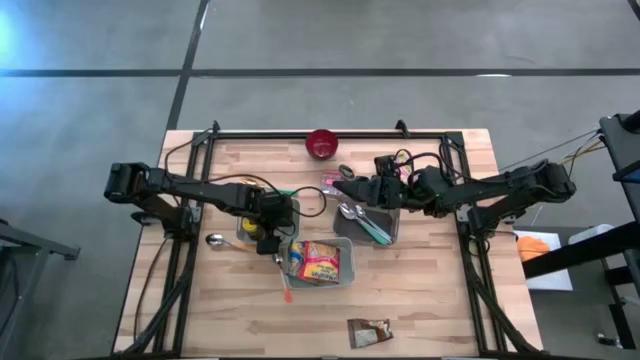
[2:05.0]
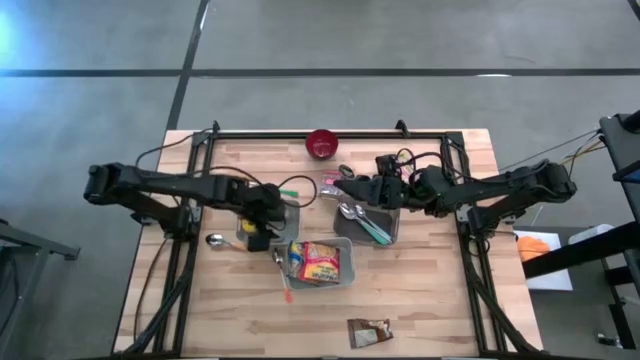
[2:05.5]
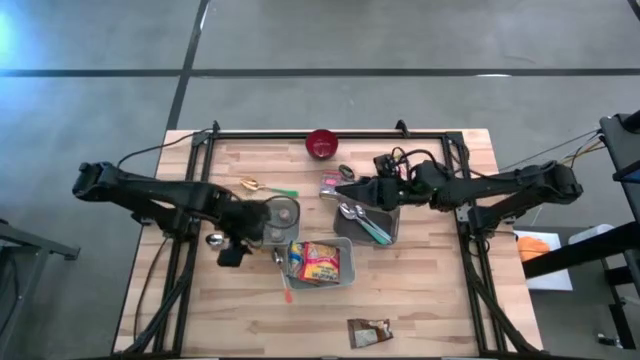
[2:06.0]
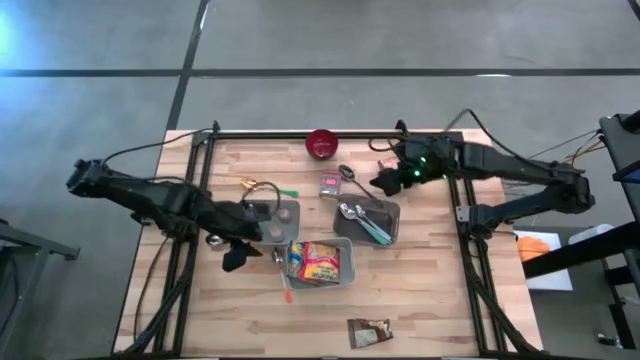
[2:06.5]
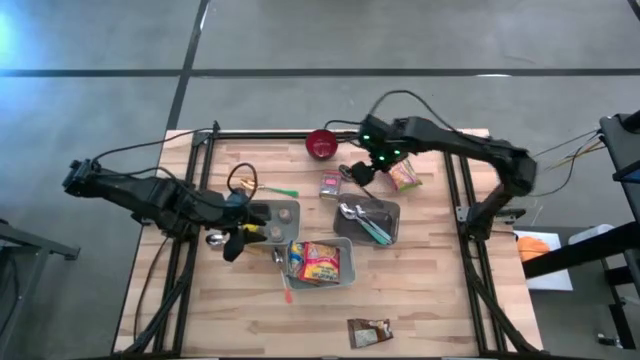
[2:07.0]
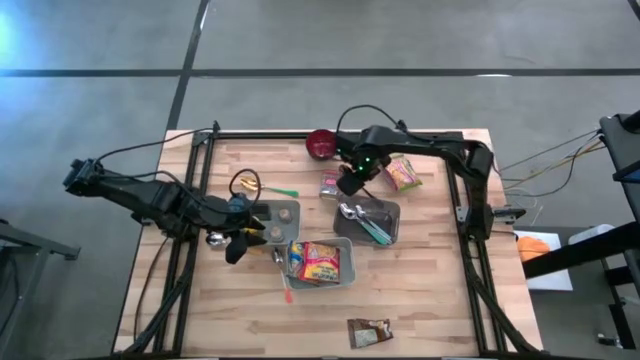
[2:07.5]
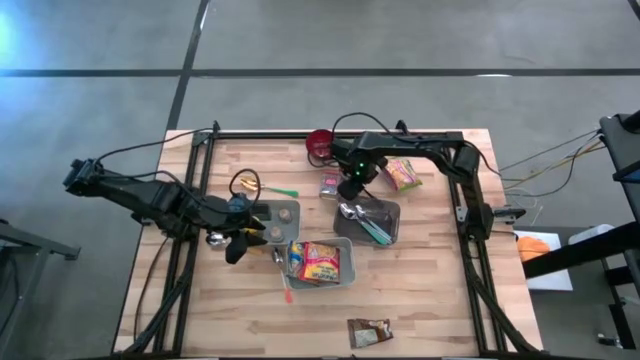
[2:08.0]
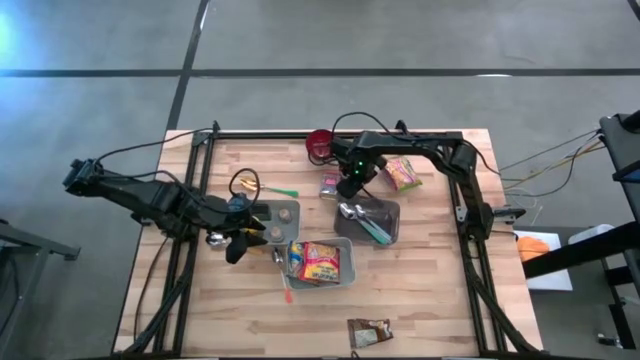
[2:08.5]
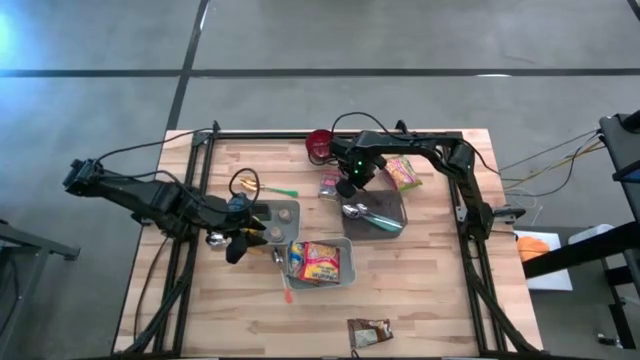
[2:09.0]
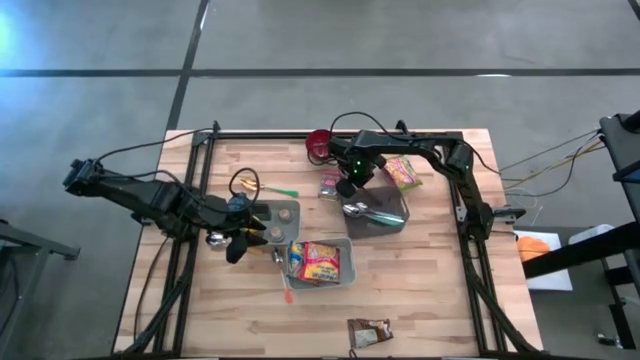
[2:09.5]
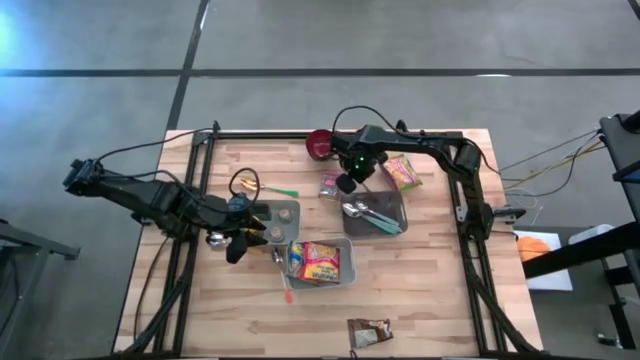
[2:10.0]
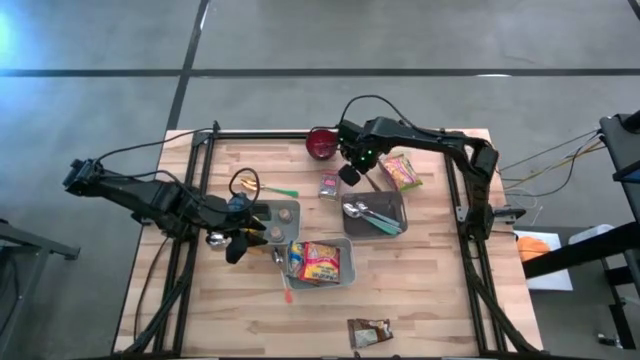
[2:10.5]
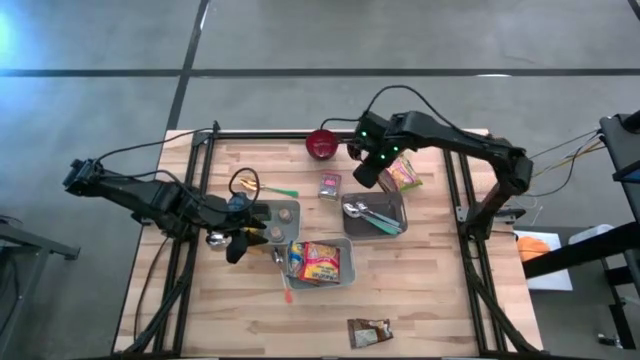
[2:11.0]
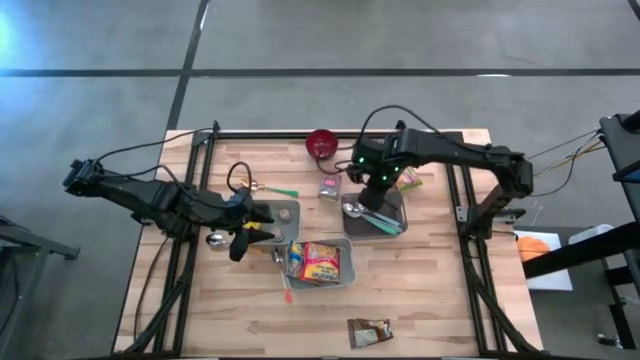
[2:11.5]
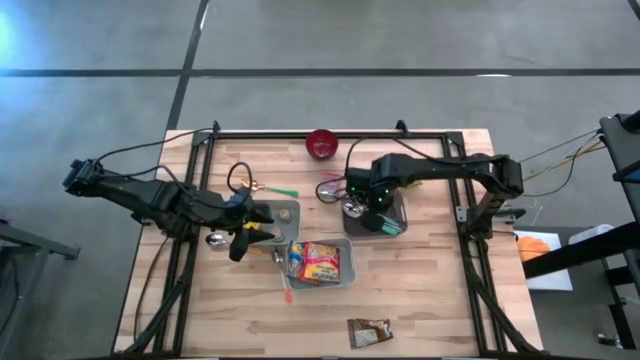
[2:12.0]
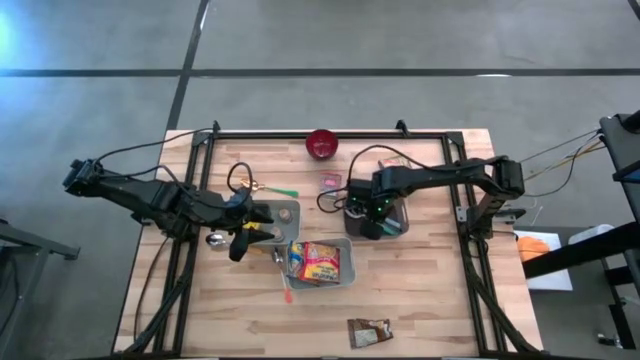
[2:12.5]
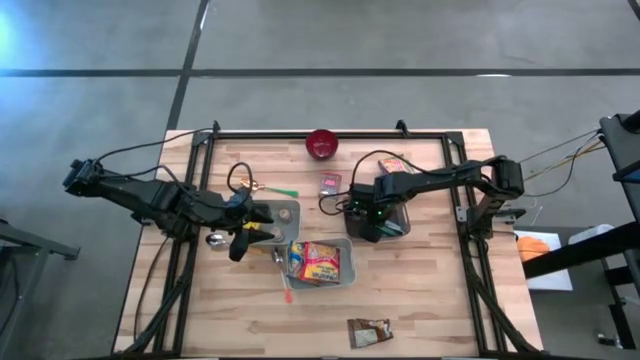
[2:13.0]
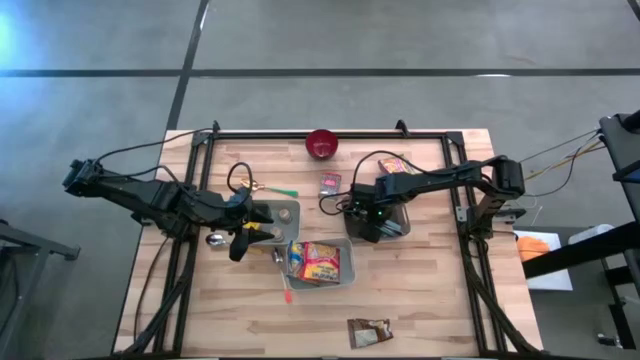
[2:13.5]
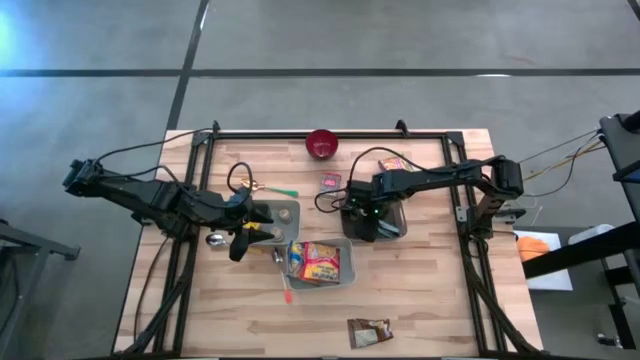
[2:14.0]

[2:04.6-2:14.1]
Put the black spoon into the black bin

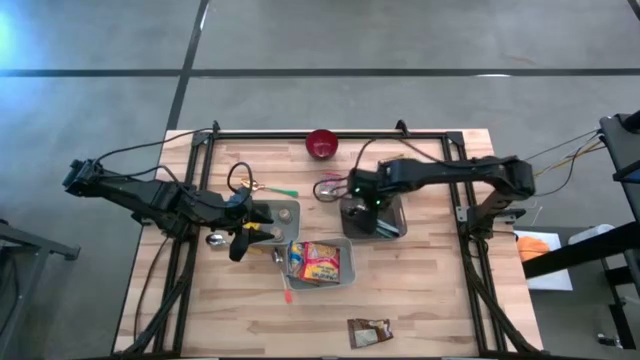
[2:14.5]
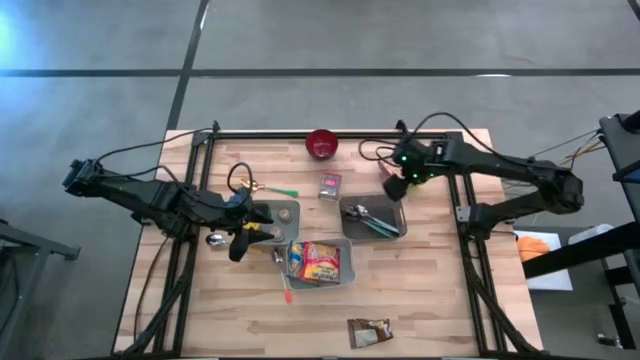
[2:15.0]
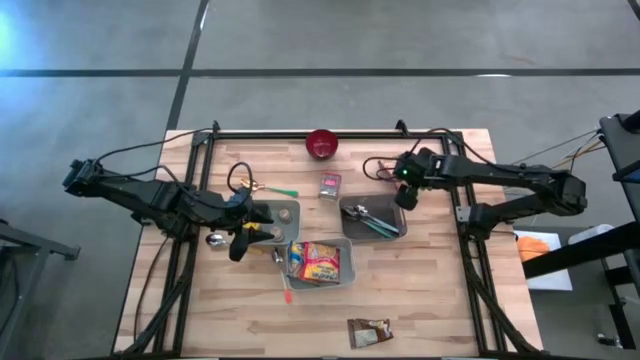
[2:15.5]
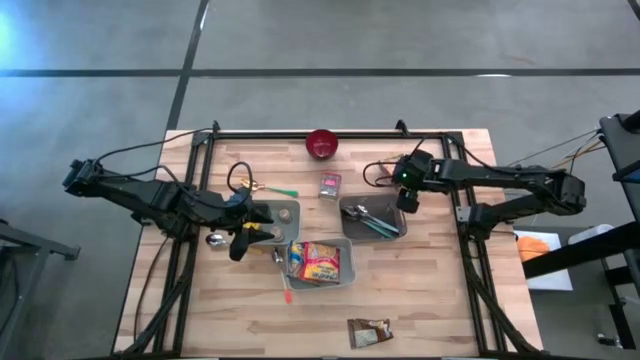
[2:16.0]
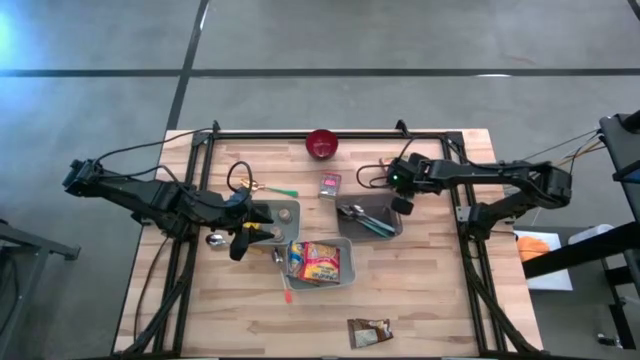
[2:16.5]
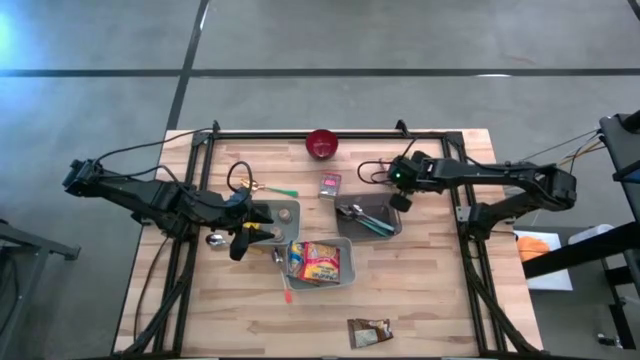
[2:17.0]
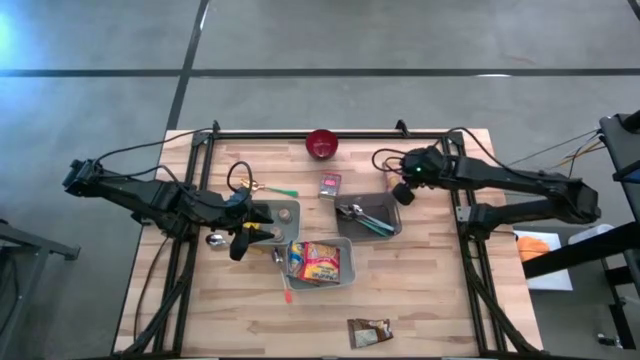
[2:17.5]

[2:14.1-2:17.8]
Put the green noodle pack into the bottom gray bin

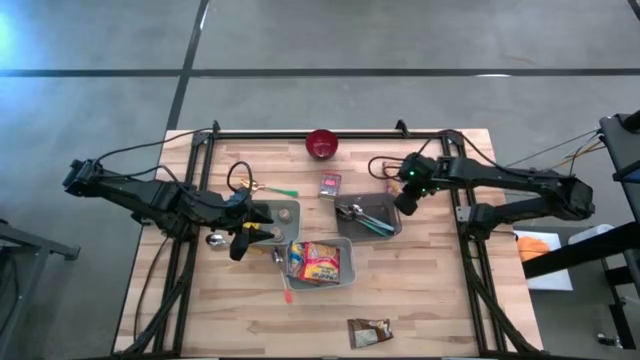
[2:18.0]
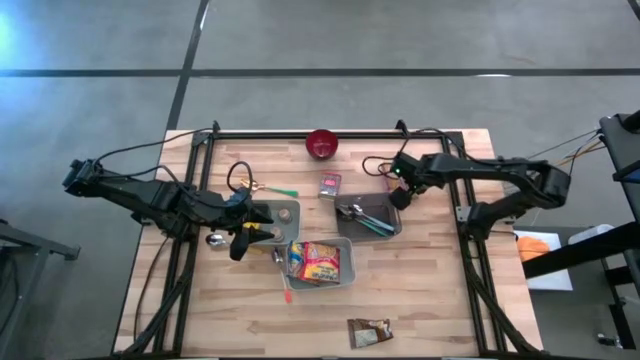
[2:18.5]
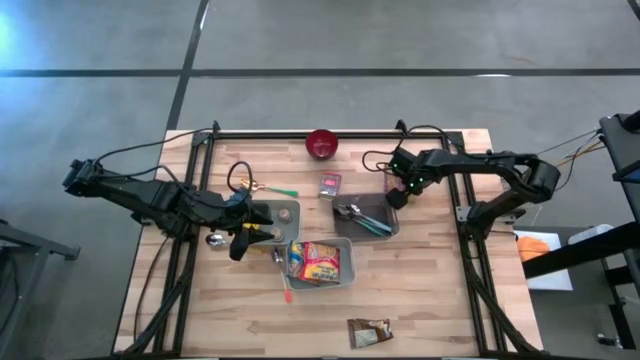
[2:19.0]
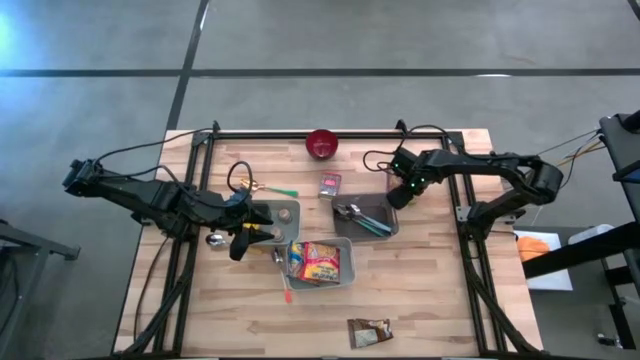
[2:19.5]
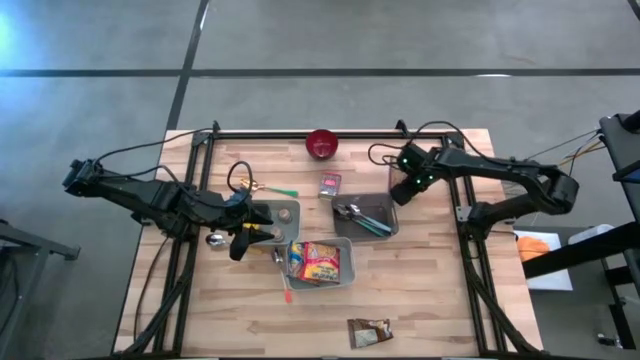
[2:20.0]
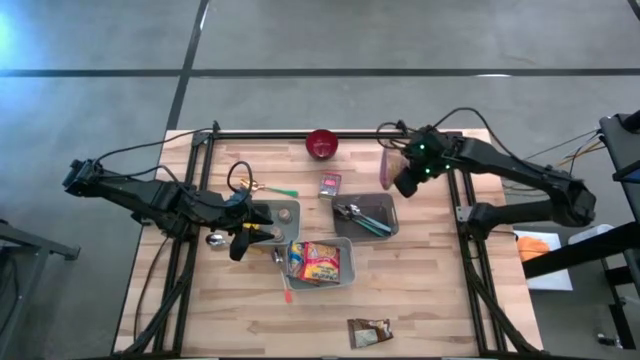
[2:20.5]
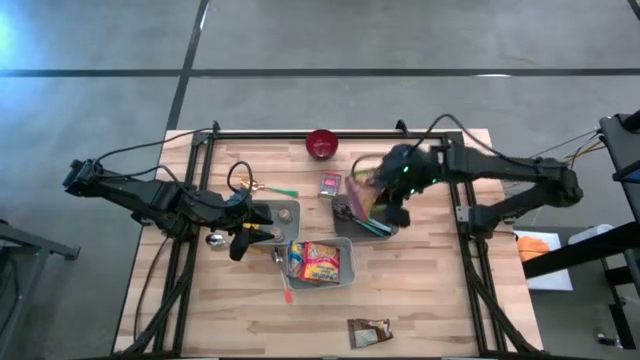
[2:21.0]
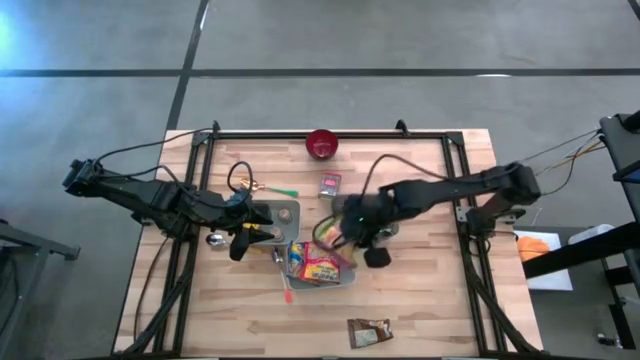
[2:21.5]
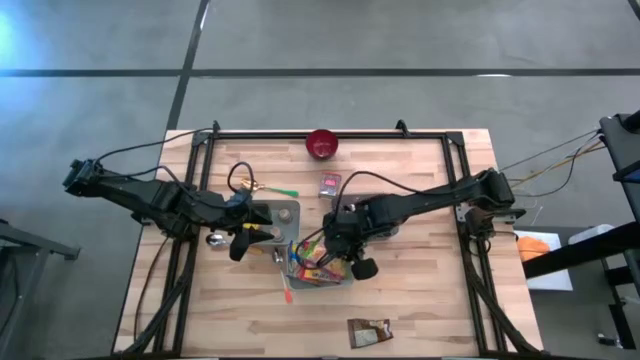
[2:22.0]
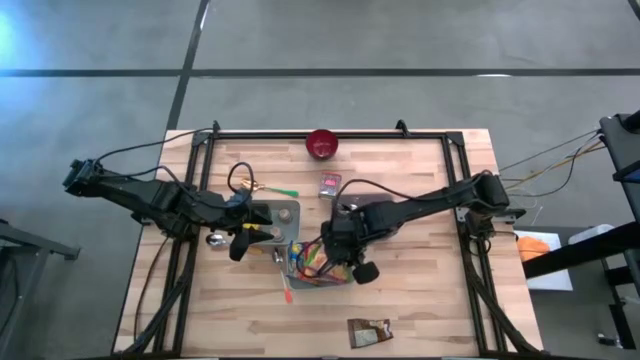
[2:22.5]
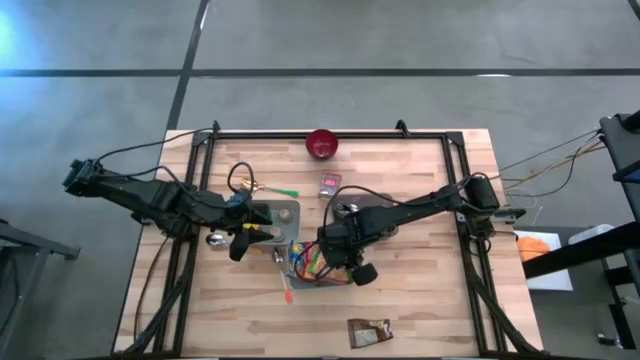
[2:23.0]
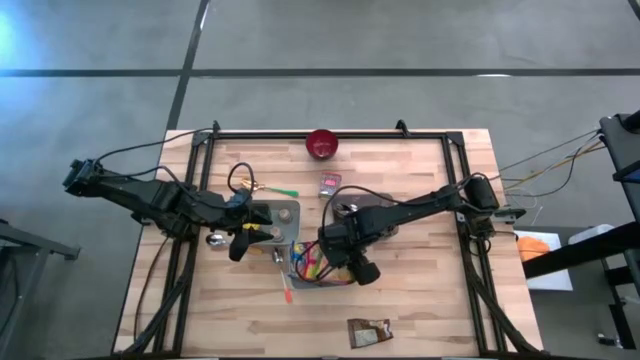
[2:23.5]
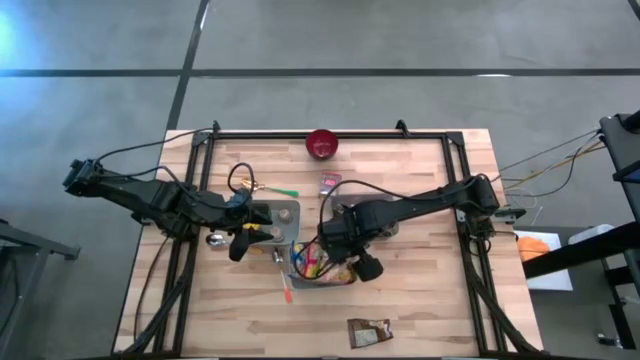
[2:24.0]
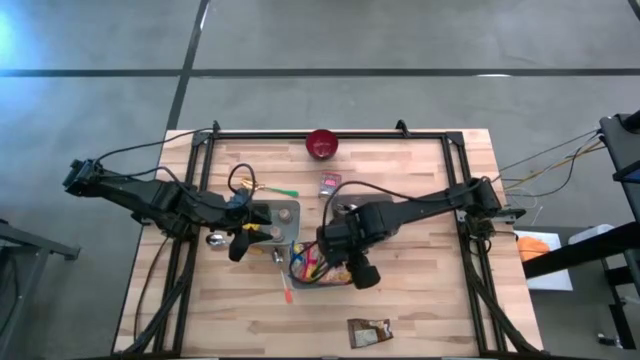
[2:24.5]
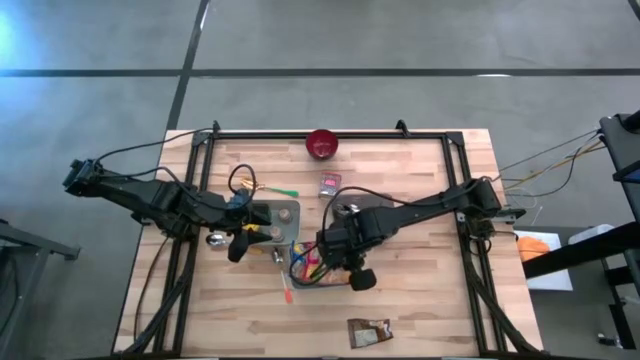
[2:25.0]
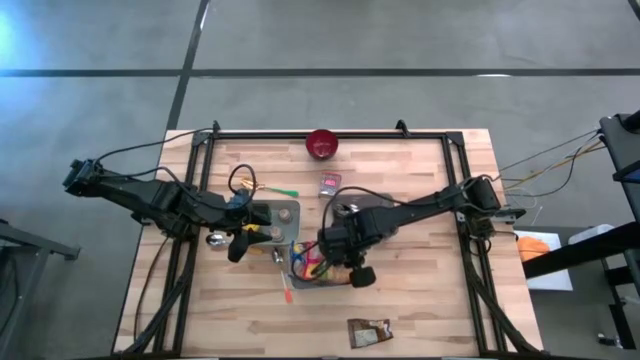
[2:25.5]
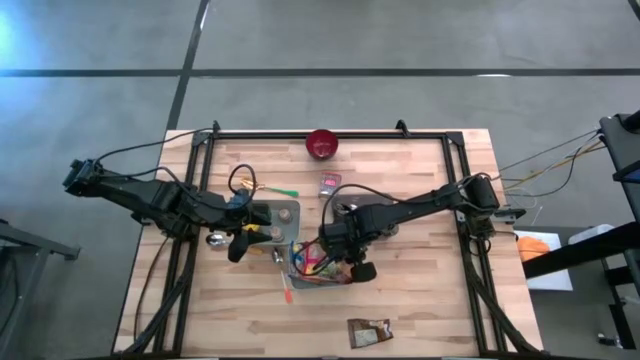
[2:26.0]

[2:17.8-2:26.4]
Put the green noodle pack into the bottom gray bin
